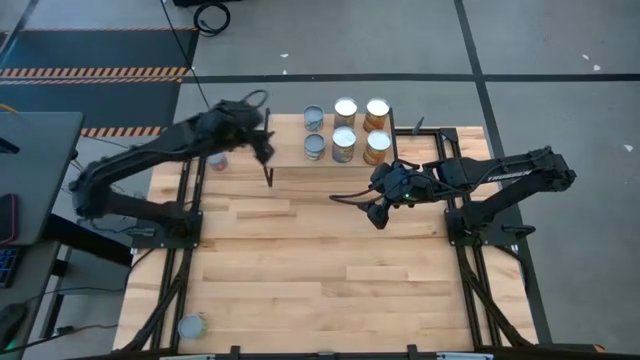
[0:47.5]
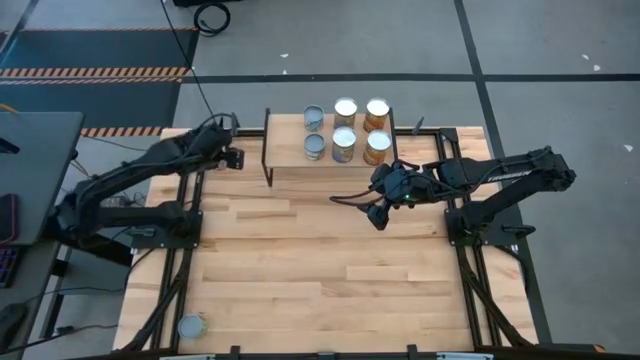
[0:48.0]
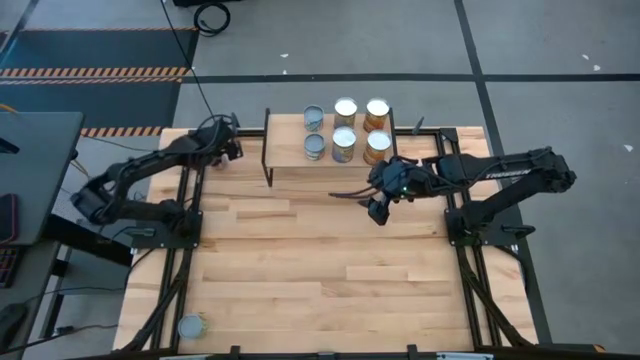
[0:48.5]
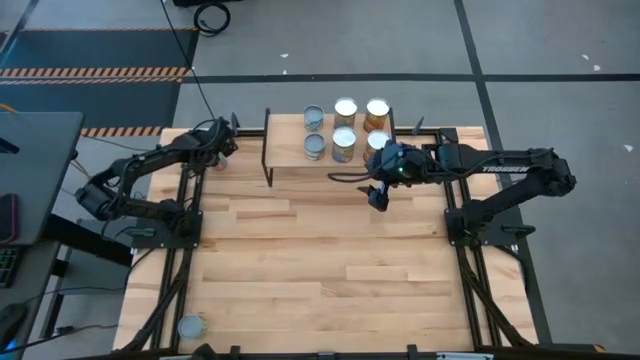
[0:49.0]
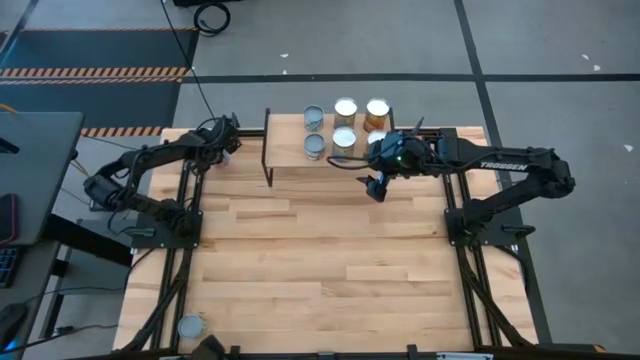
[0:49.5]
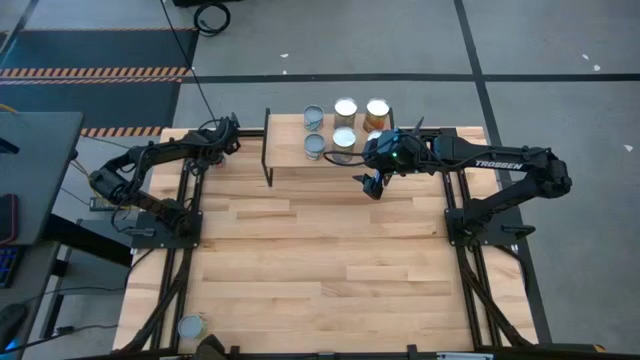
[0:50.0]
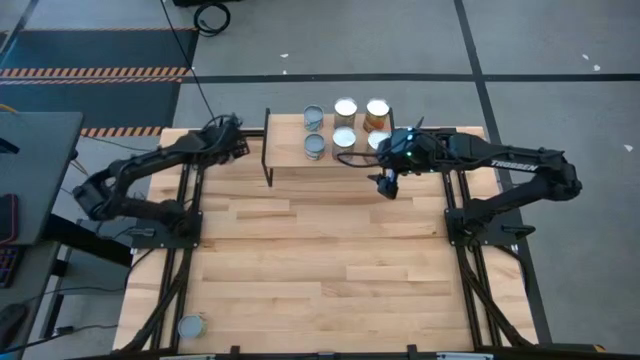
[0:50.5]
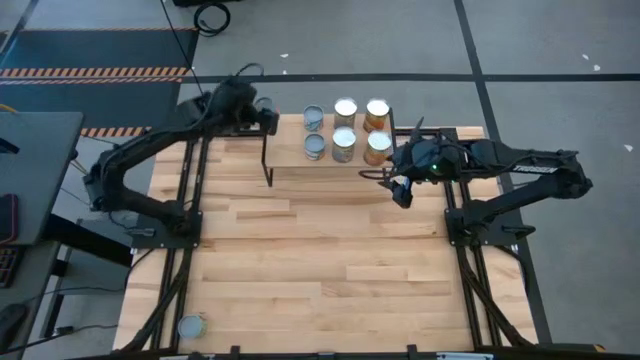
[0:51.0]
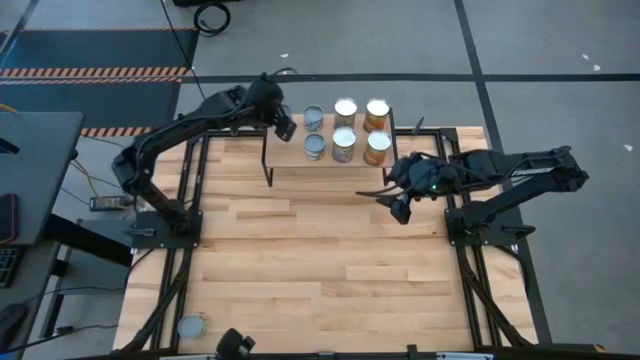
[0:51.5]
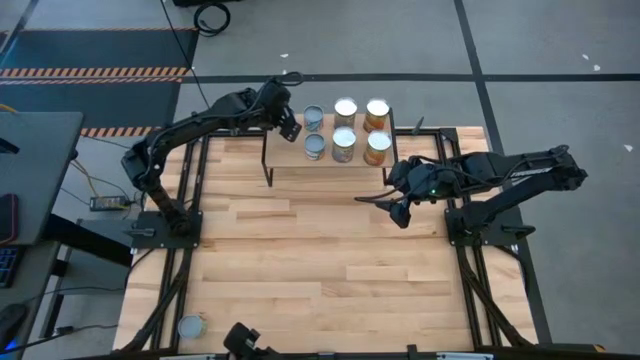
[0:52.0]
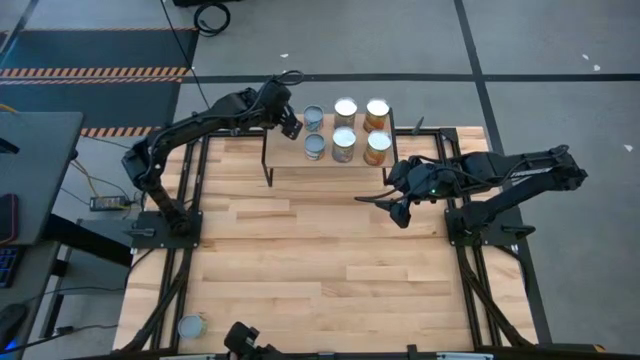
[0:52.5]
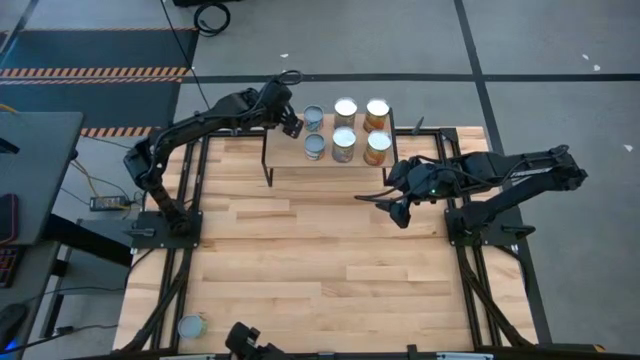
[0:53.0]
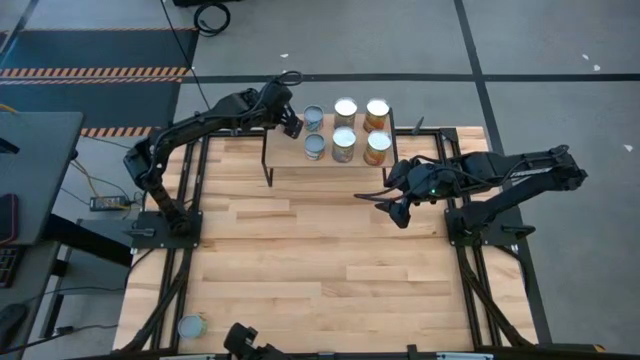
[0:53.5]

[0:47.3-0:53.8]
Task: Pick and place cans onto a shelf
Put the small canned corn on the shelf

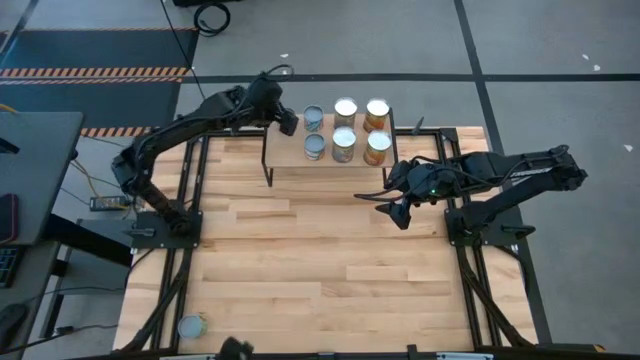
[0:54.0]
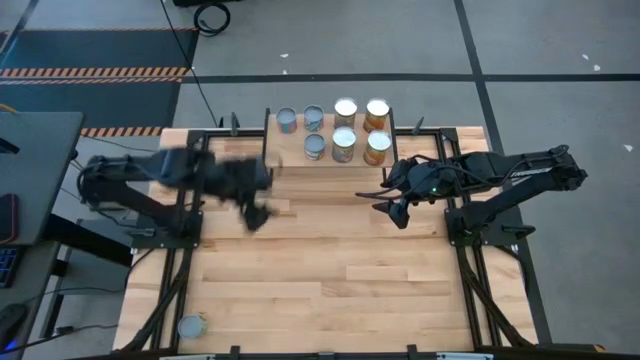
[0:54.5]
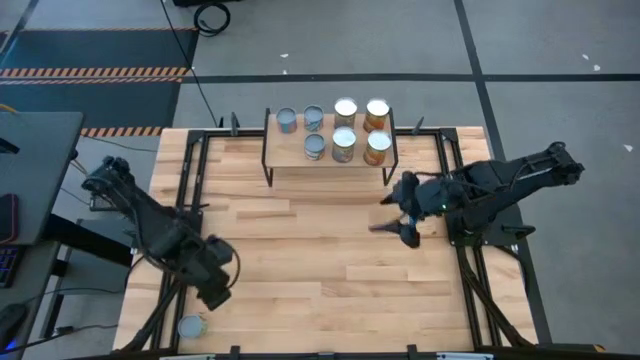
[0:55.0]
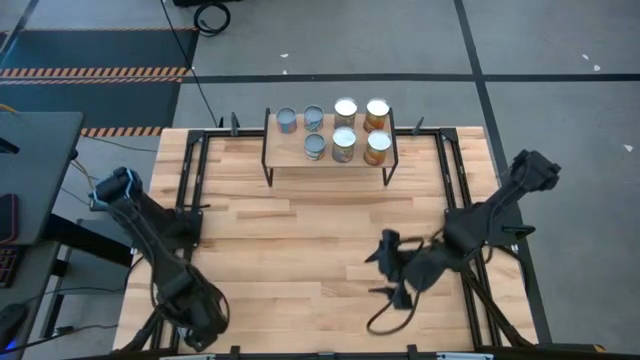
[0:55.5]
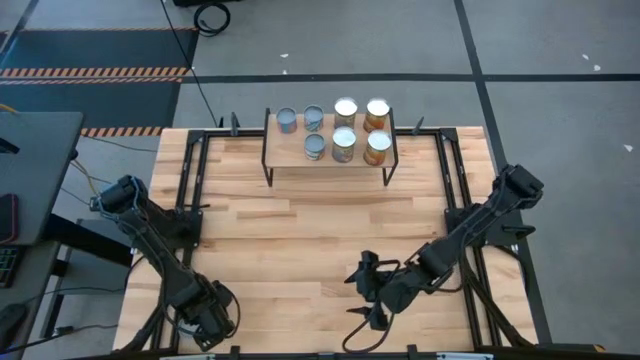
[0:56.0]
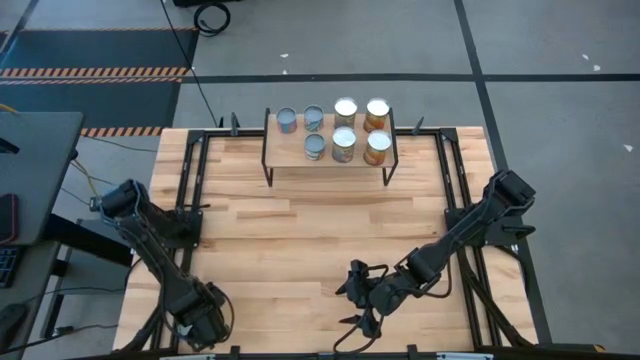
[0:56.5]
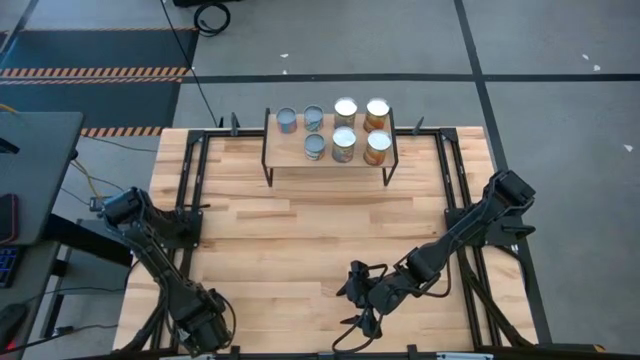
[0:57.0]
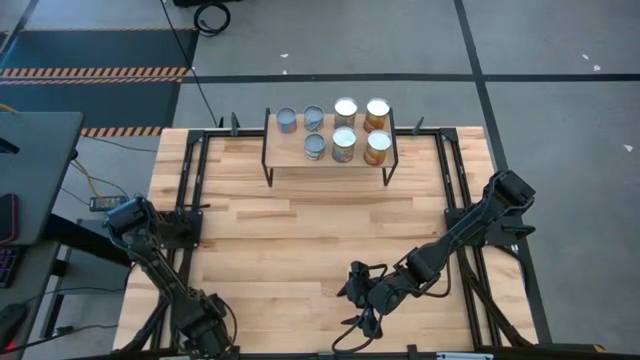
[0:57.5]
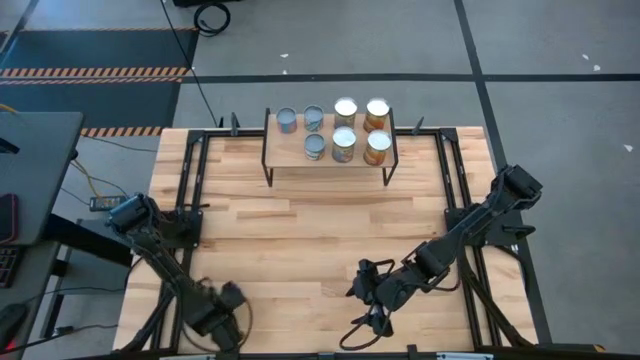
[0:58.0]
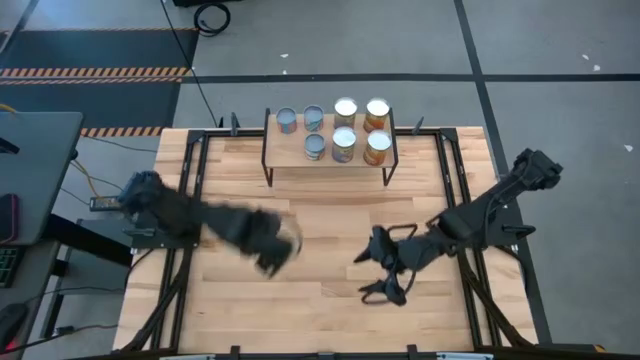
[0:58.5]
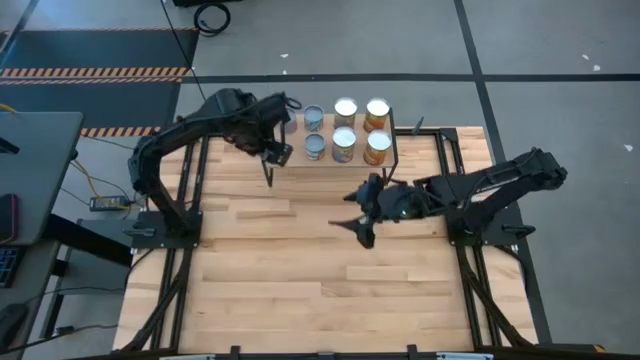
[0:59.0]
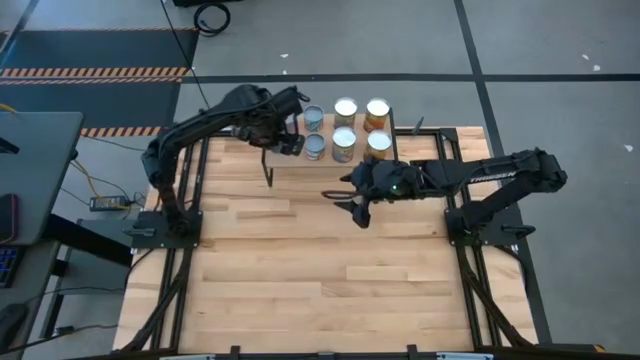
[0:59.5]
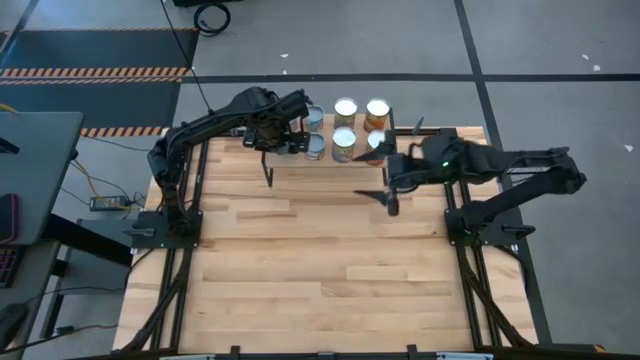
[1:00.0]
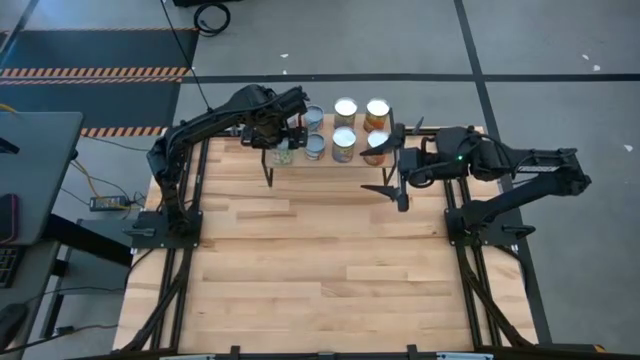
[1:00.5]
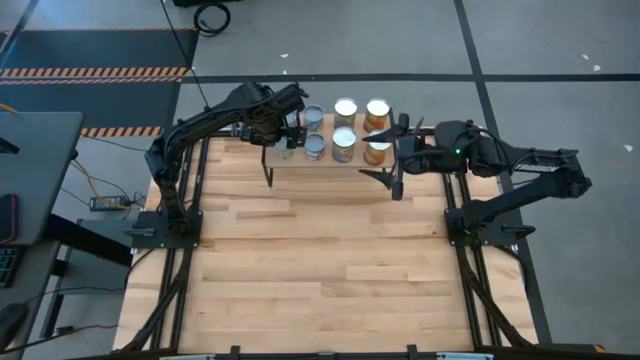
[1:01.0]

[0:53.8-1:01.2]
Put the canned peas on the shelf

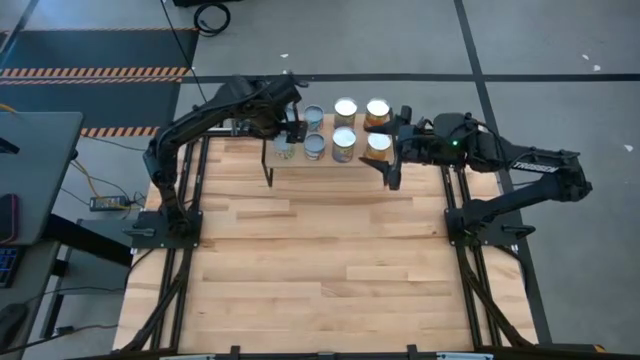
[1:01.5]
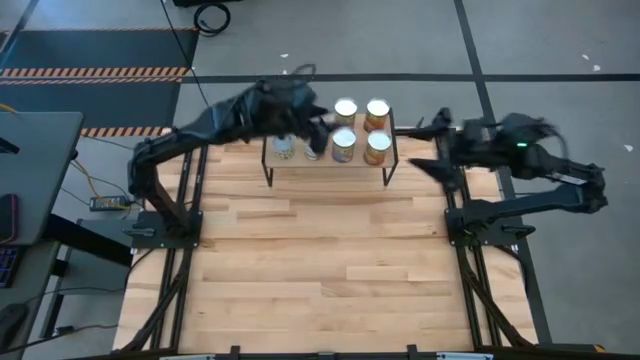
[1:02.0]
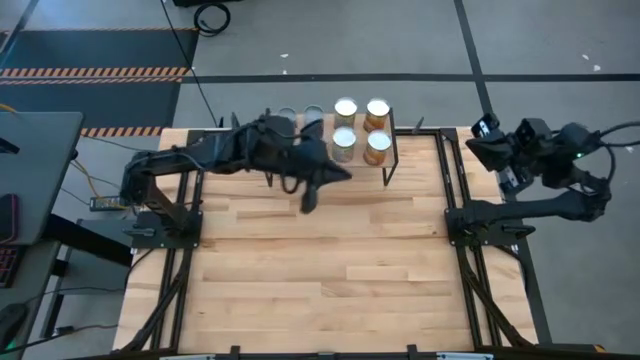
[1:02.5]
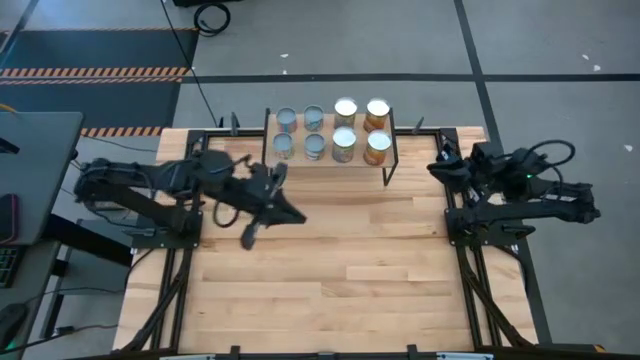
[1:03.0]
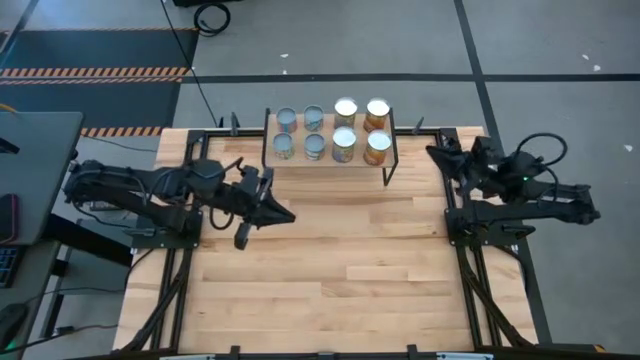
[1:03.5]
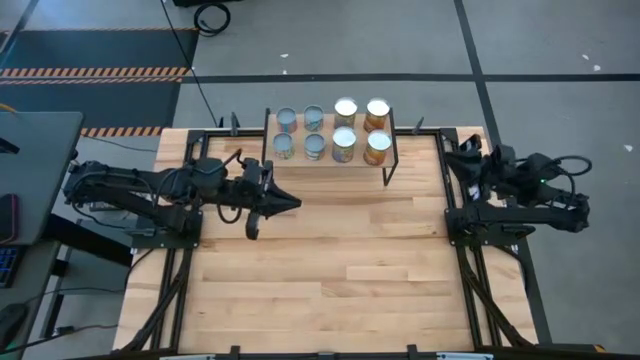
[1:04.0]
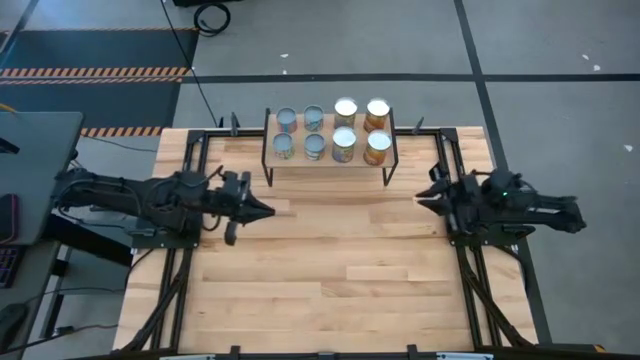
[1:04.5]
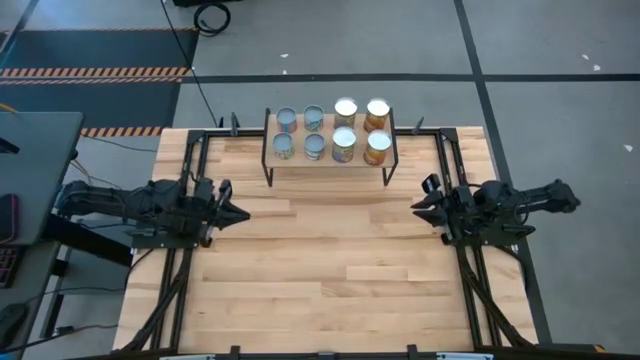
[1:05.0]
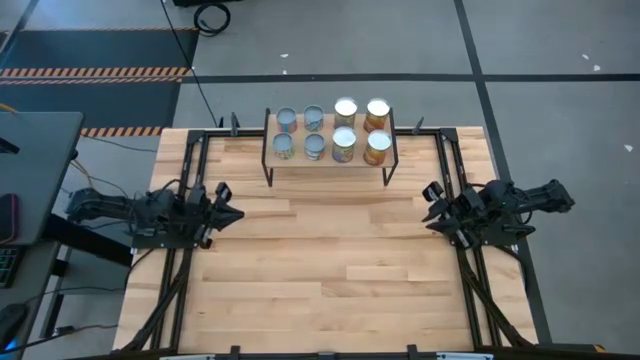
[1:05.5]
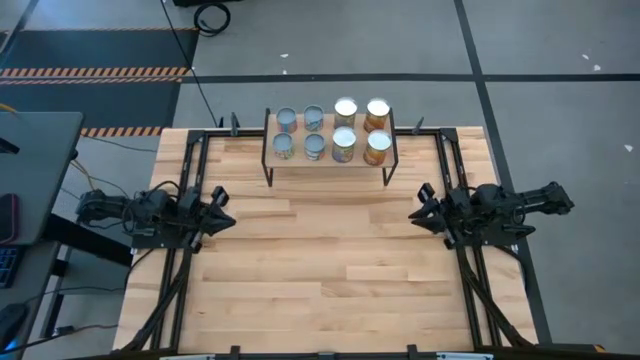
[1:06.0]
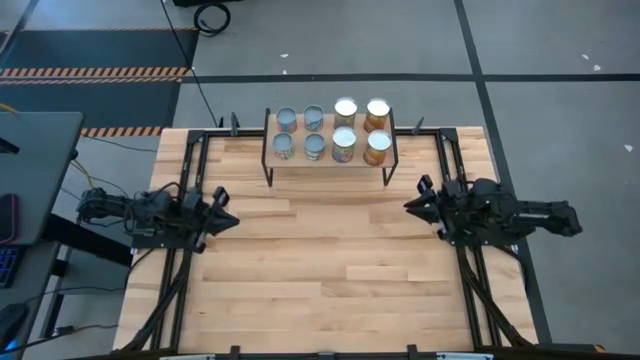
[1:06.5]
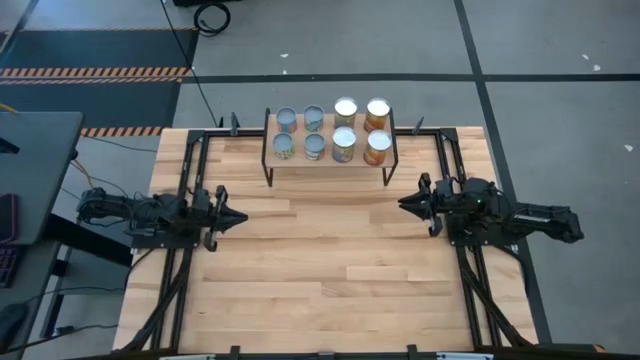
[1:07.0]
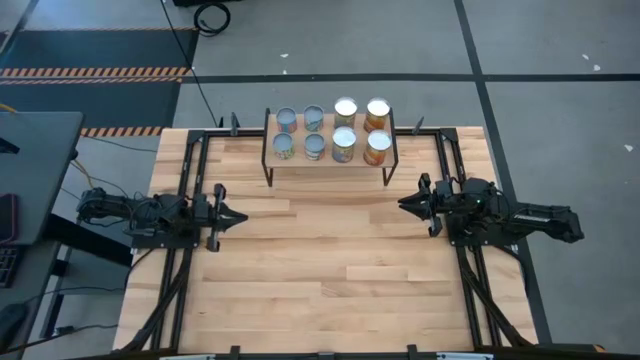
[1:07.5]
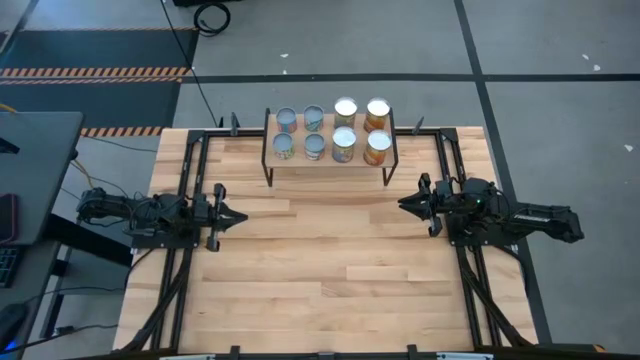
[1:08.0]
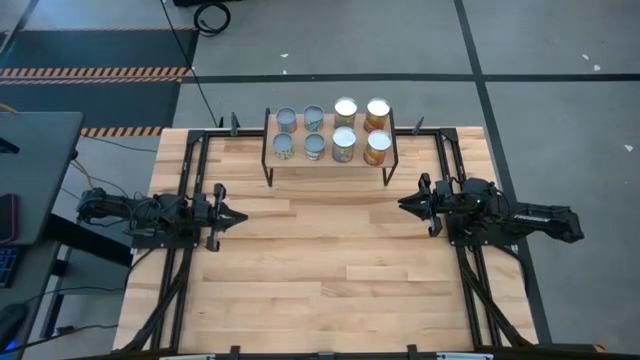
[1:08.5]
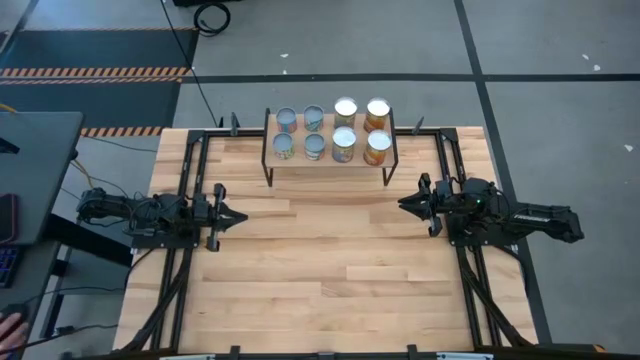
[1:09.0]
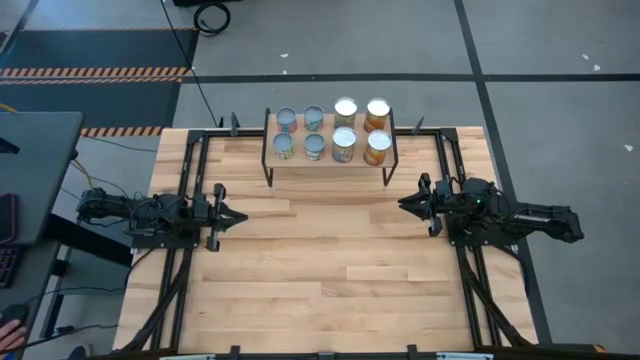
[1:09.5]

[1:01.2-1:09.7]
Return to Home Position
